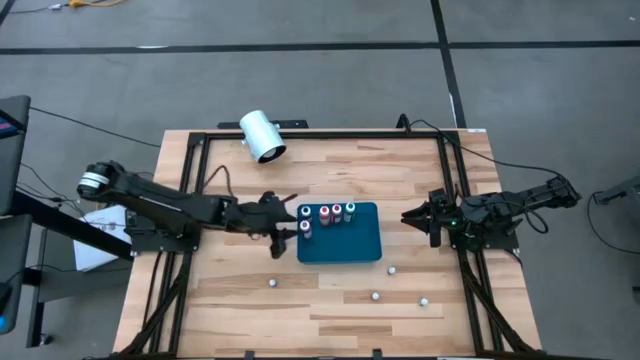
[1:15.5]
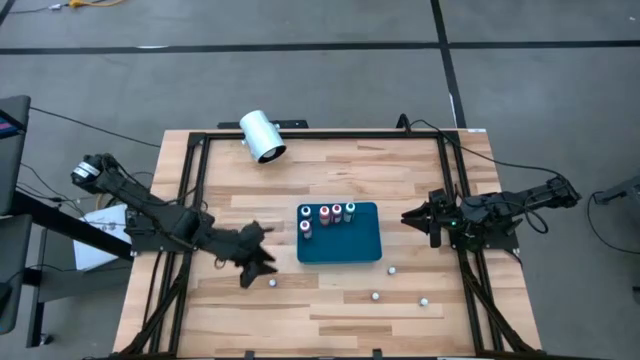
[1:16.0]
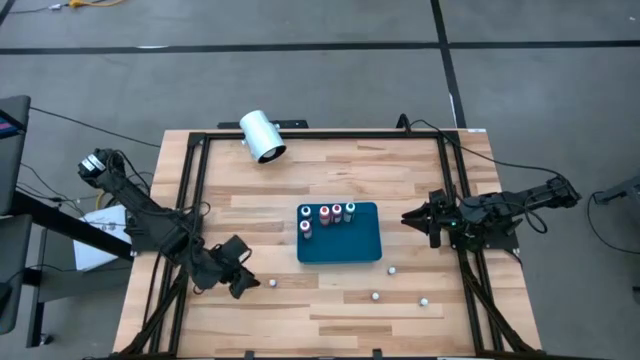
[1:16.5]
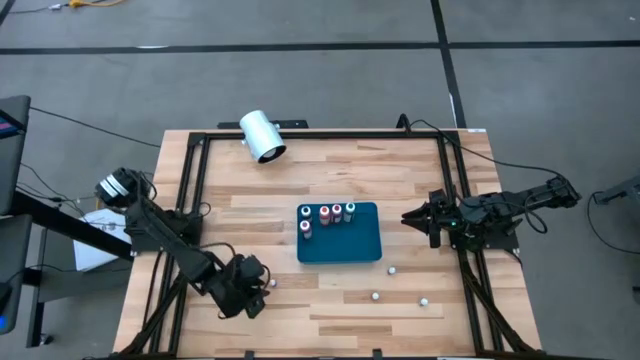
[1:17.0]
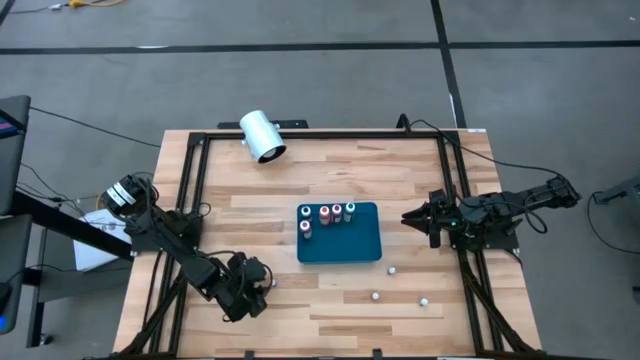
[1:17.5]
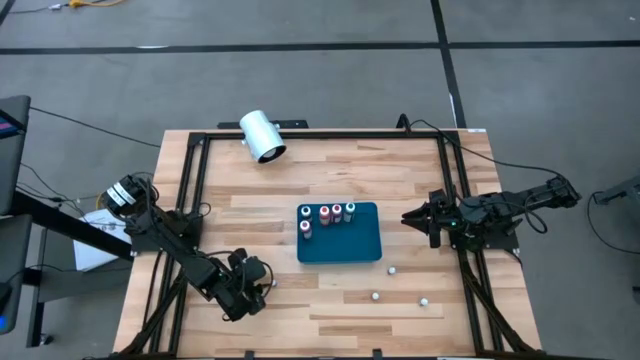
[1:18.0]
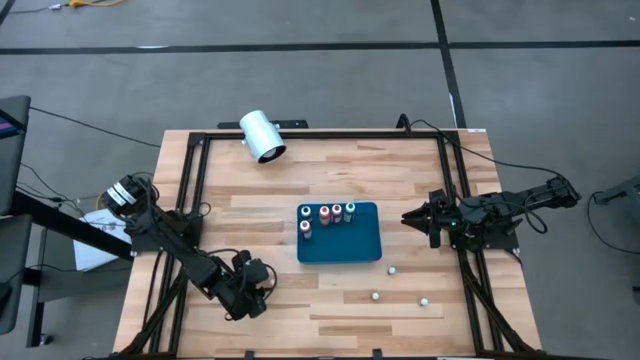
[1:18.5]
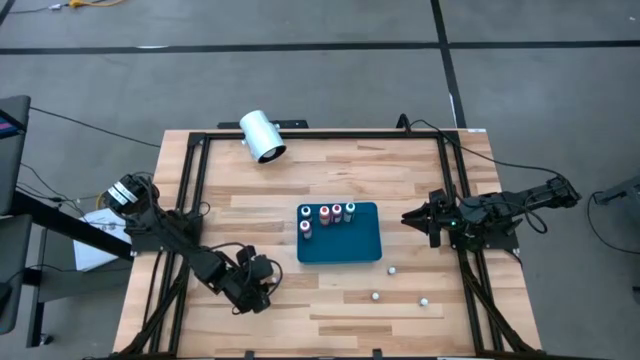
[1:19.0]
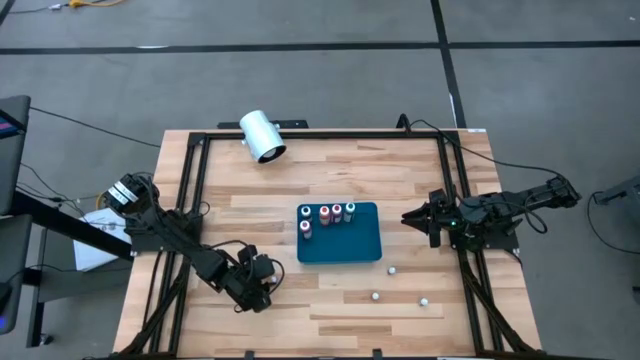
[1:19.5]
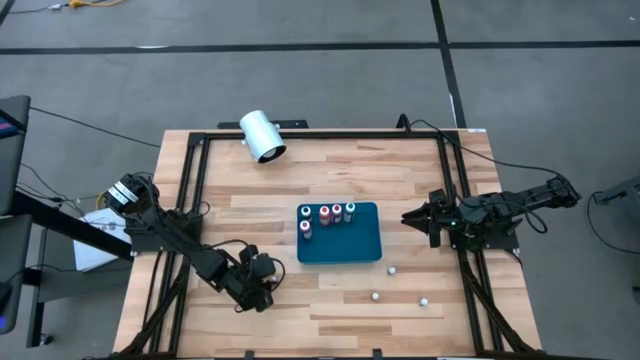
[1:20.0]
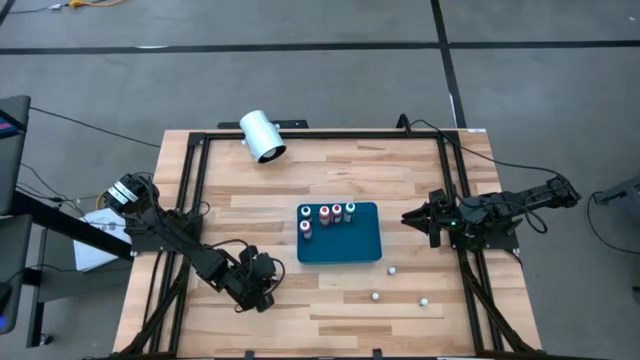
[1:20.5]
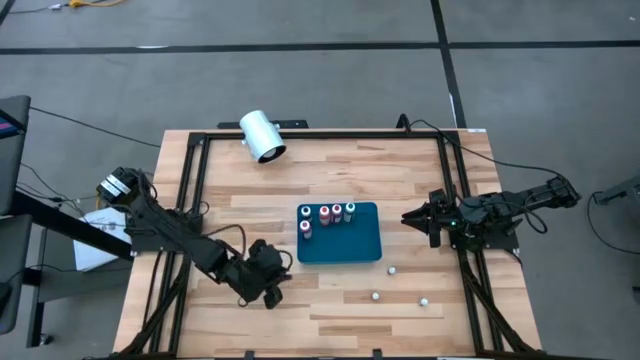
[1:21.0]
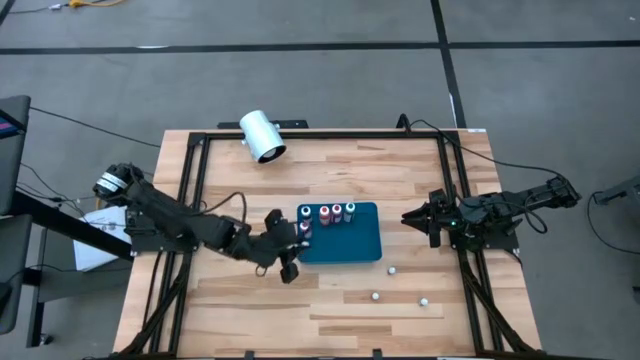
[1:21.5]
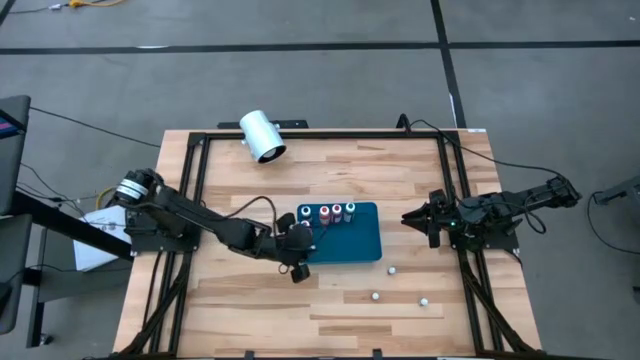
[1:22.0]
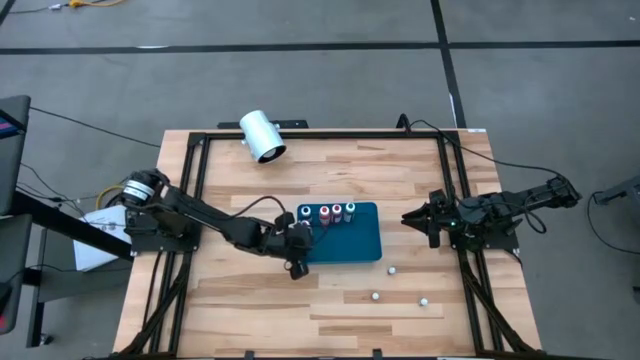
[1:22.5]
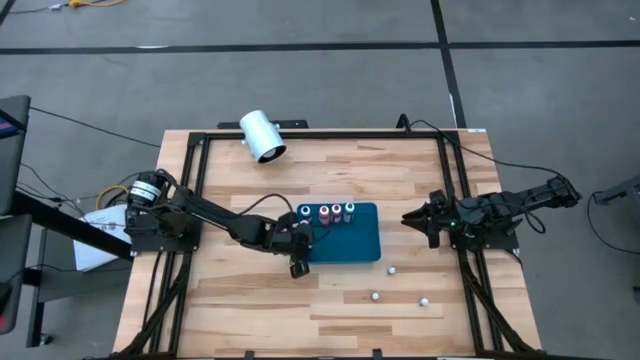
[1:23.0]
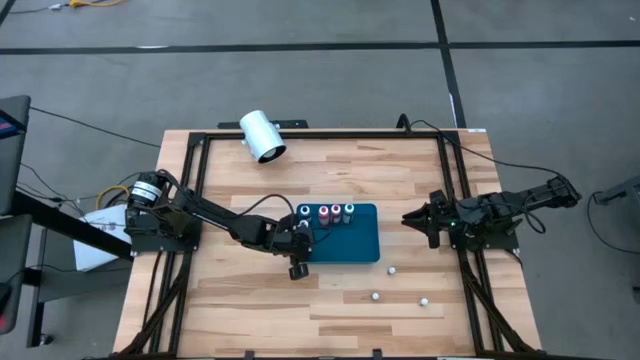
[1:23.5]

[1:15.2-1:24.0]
Task: Pick & Place food coloring
Put the small violet food coloring bottle into the blue bin

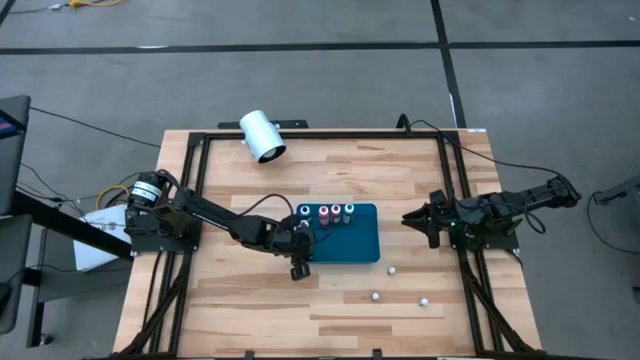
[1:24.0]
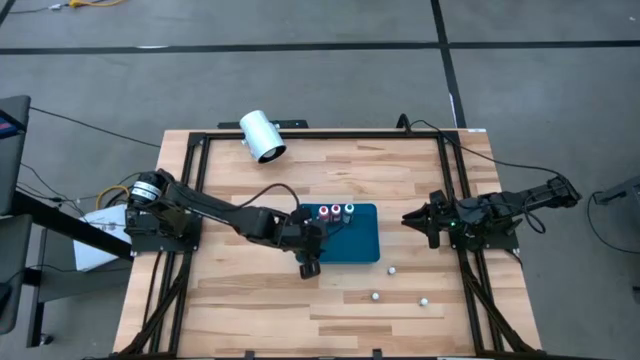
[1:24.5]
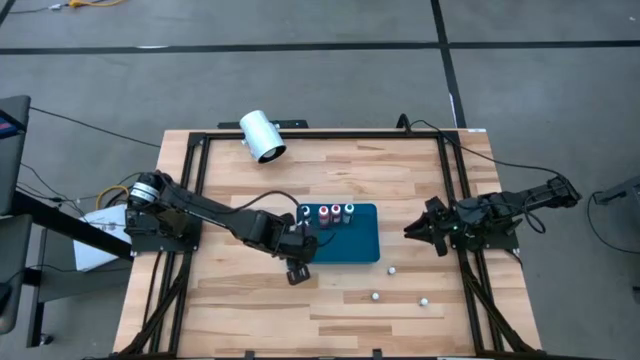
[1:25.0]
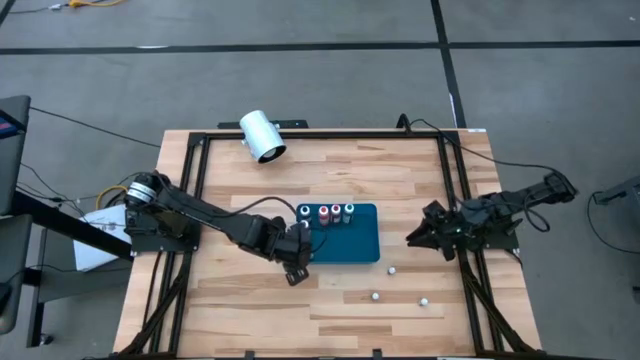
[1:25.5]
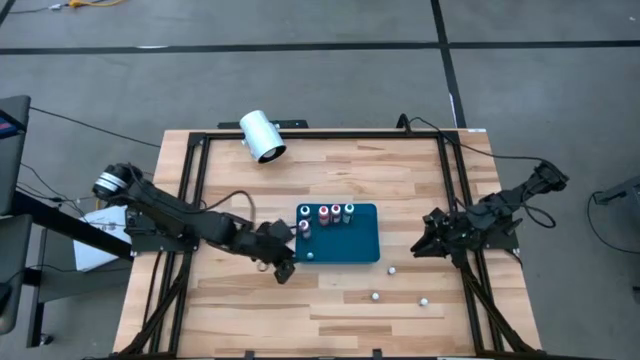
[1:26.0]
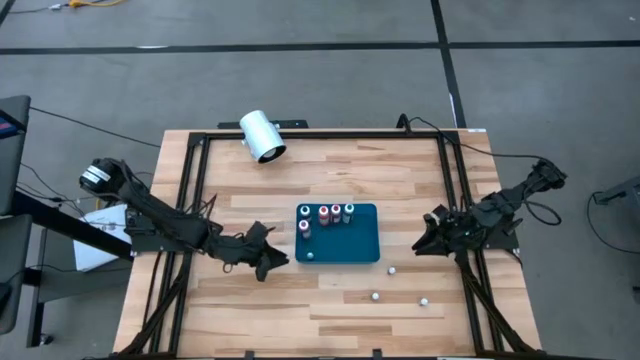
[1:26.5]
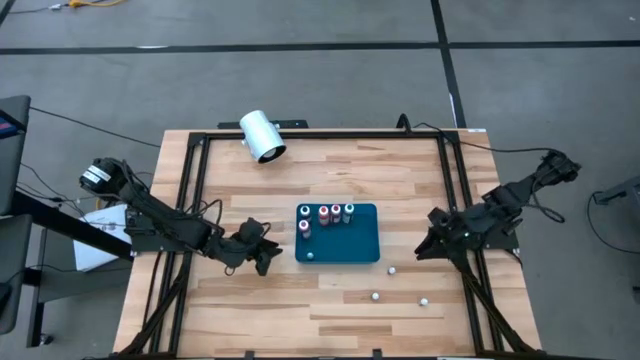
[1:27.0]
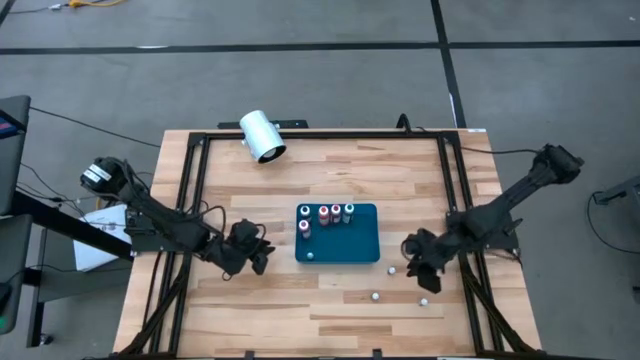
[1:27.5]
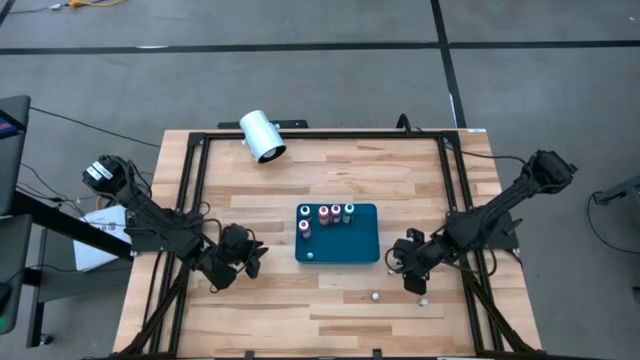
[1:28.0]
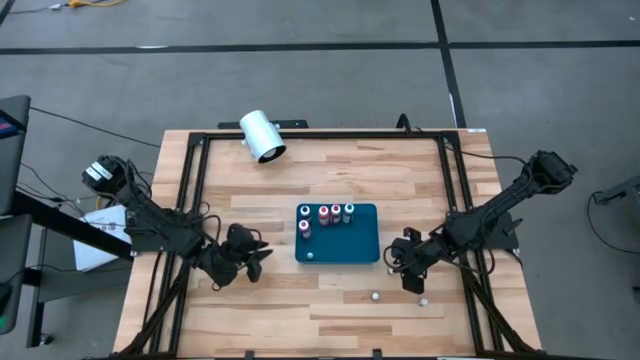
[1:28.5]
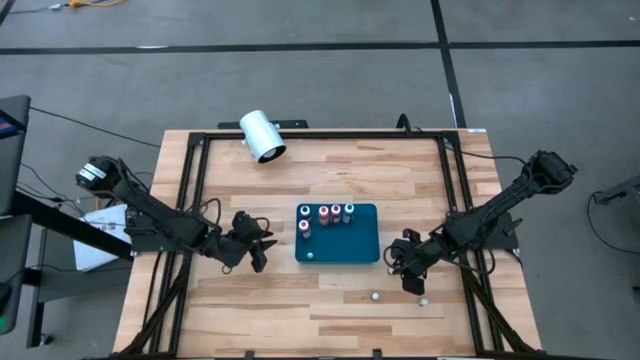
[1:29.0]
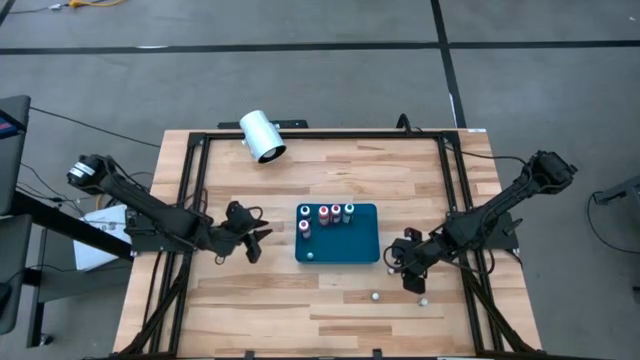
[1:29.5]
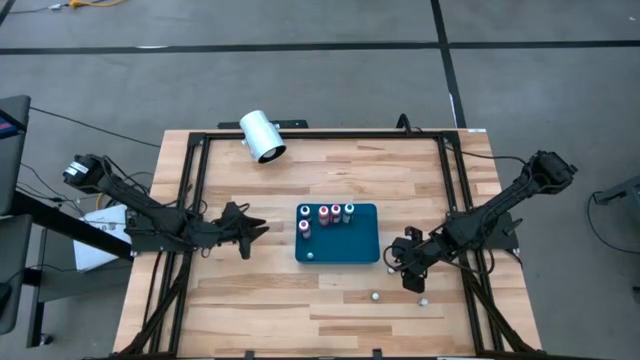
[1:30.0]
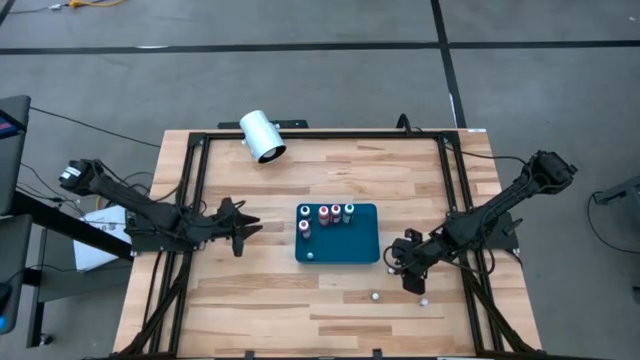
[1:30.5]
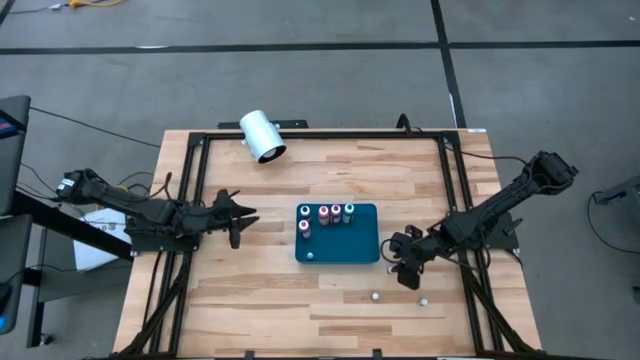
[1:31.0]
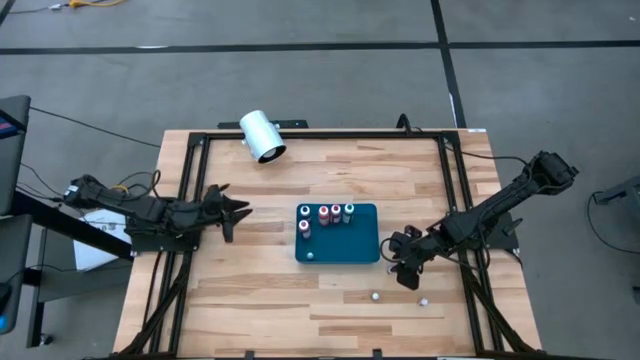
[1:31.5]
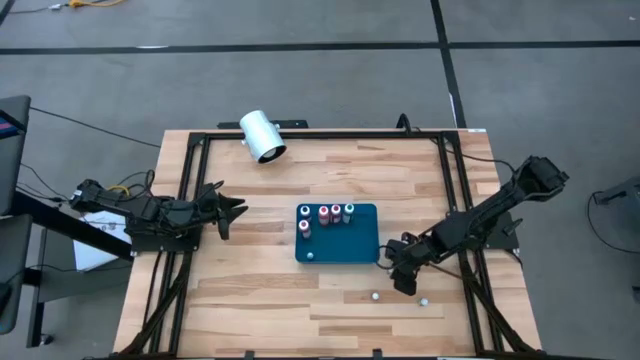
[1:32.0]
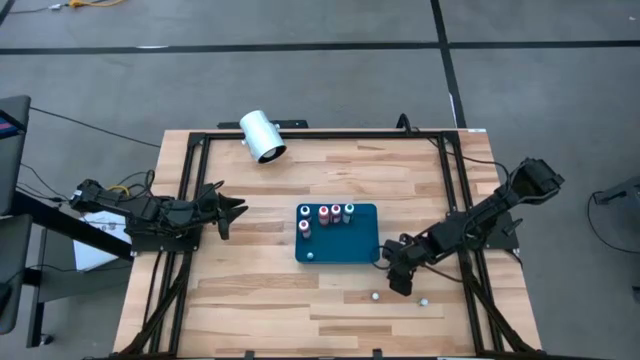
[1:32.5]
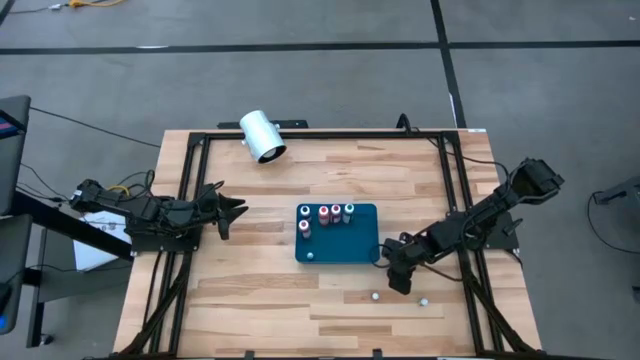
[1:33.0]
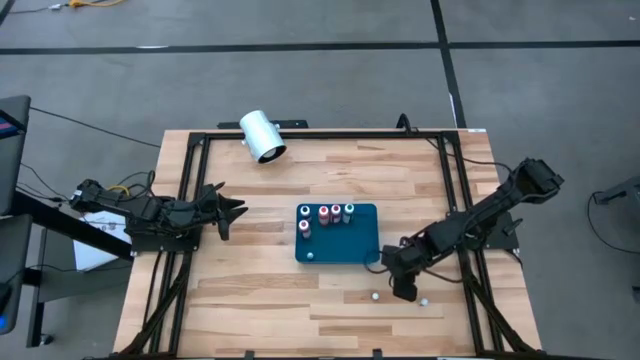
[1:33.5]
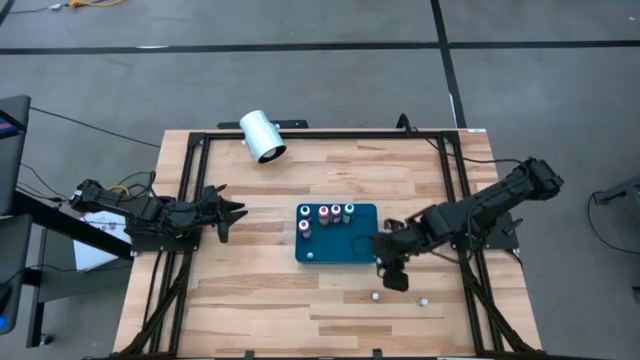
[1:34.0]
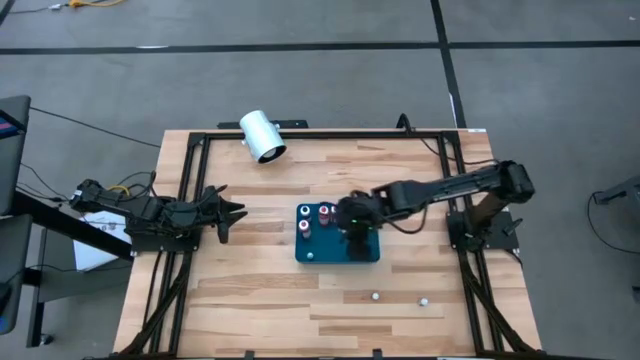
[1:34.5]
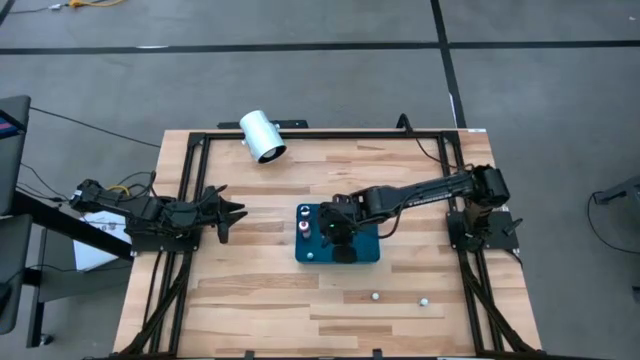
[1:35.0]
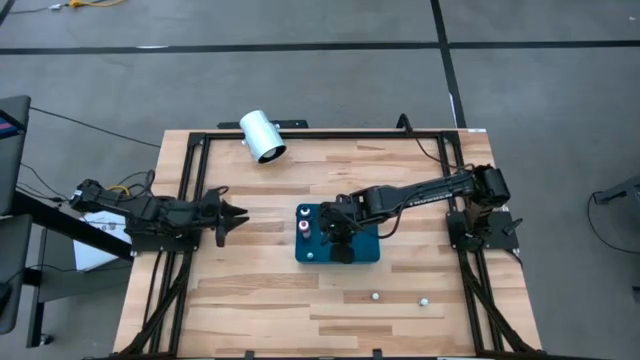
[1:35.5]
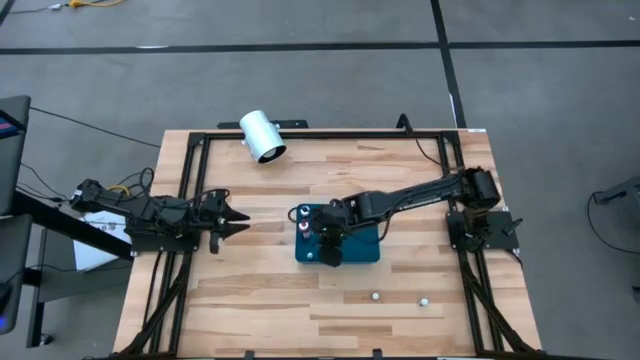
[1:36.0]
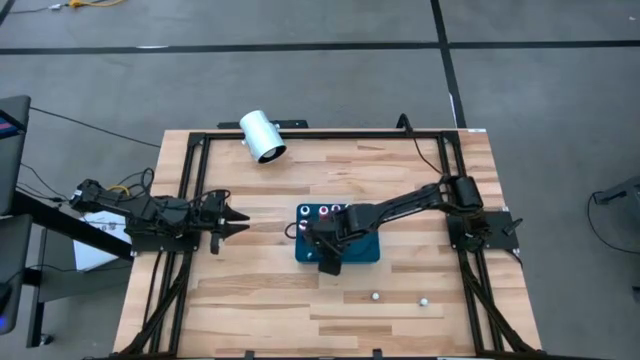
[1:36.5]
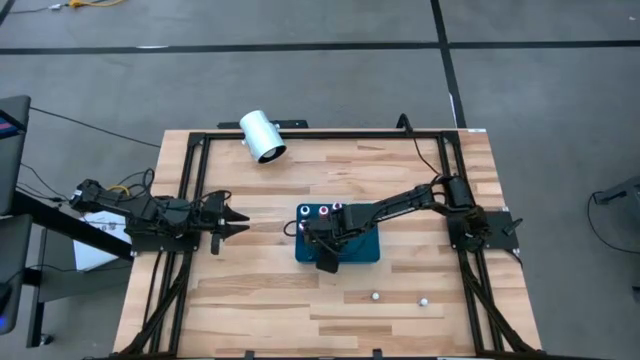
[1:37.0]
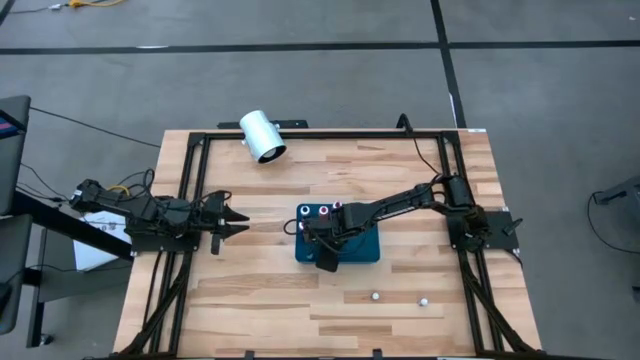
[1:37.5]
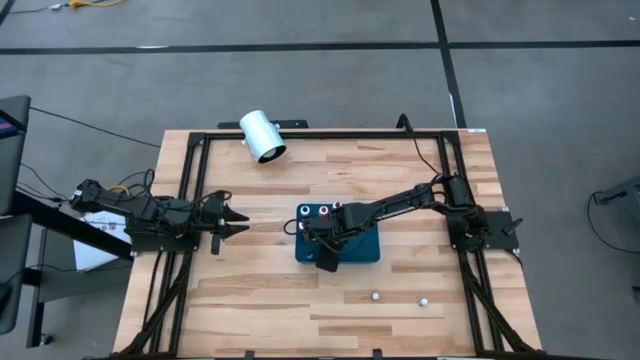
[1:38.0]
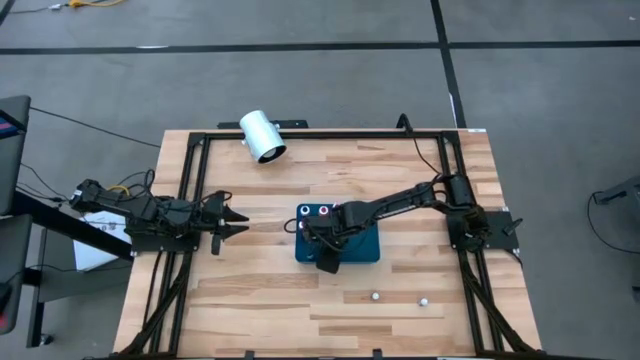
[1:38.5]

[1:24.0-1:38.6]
Put the small black food coloring bottle into the blue bin
